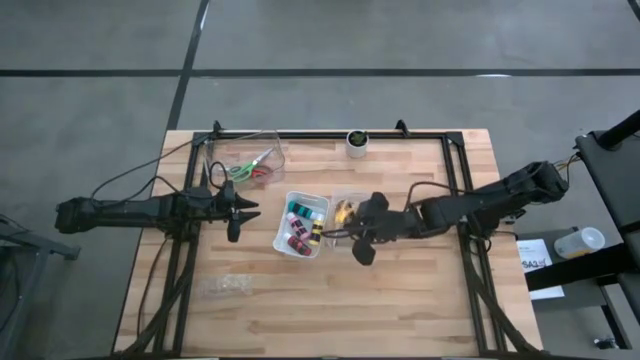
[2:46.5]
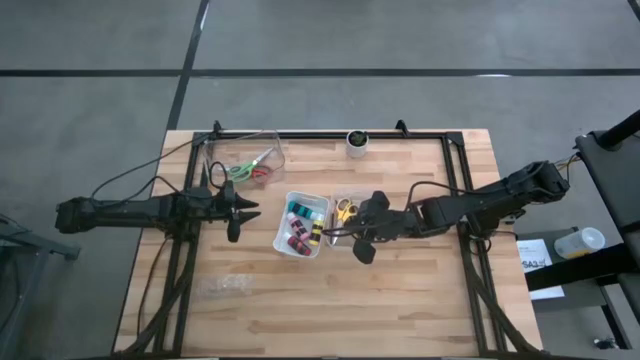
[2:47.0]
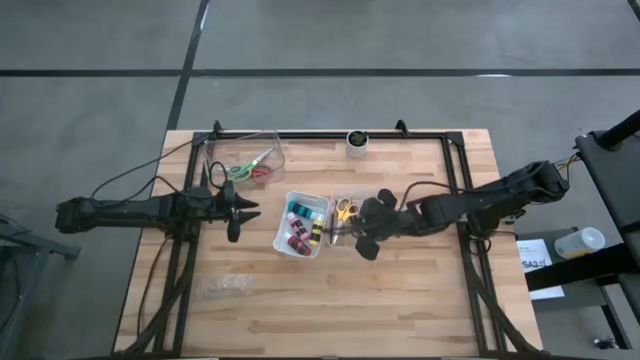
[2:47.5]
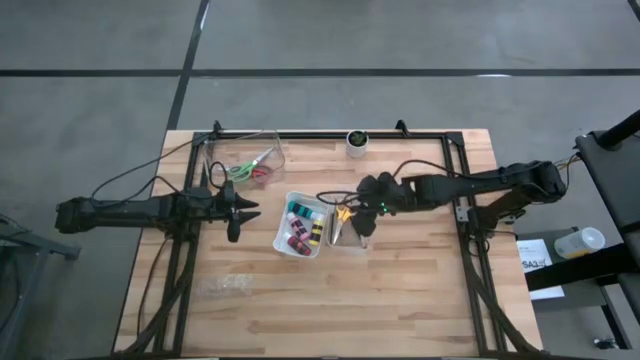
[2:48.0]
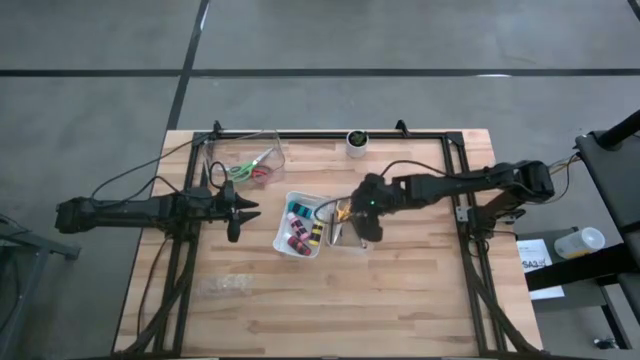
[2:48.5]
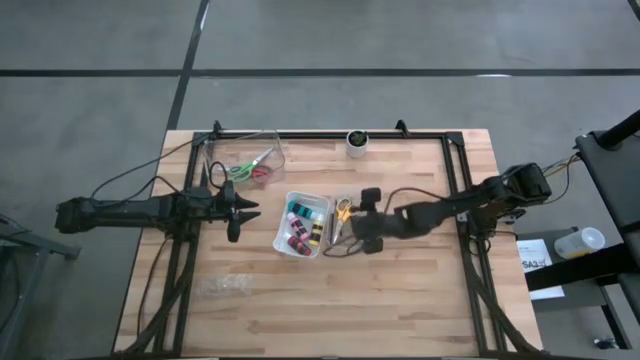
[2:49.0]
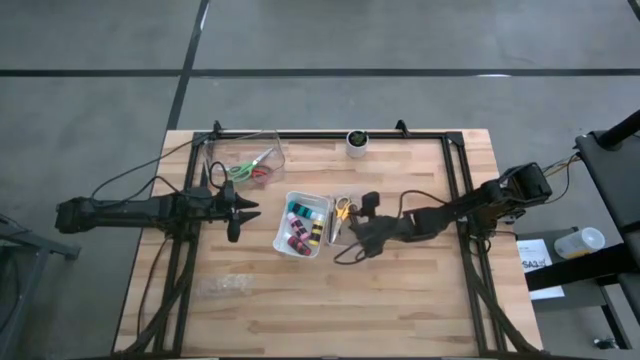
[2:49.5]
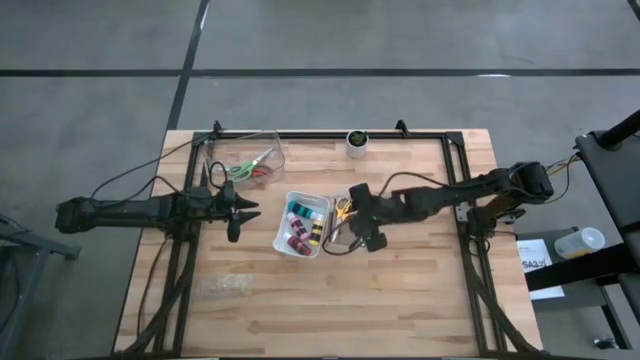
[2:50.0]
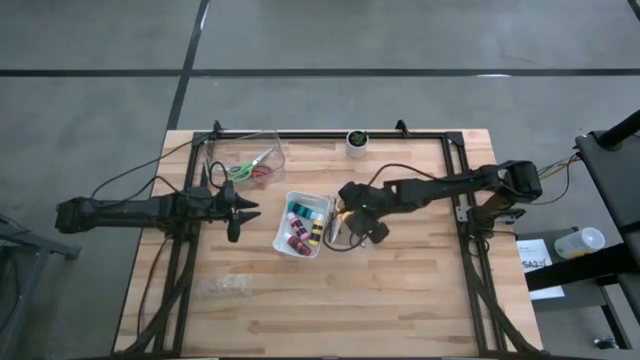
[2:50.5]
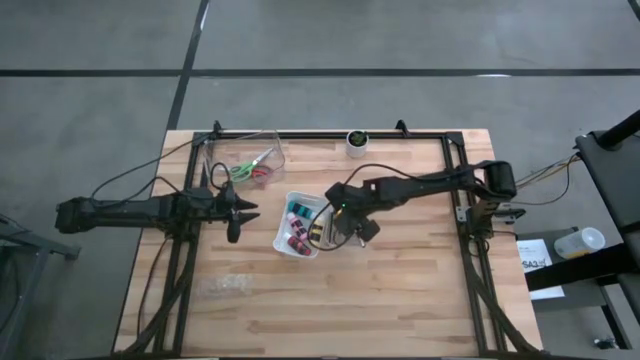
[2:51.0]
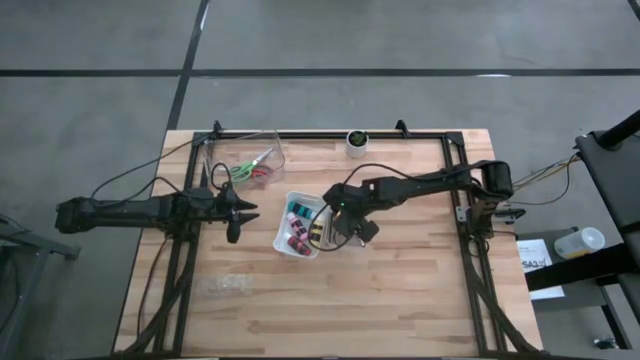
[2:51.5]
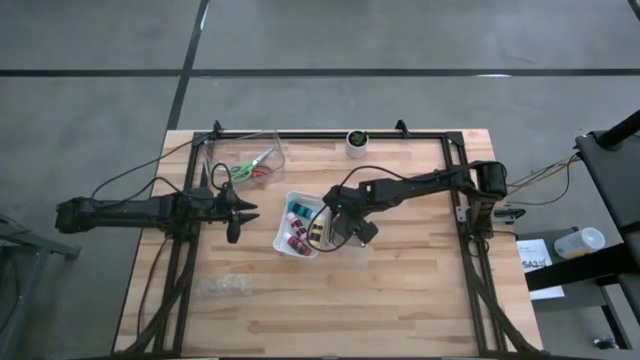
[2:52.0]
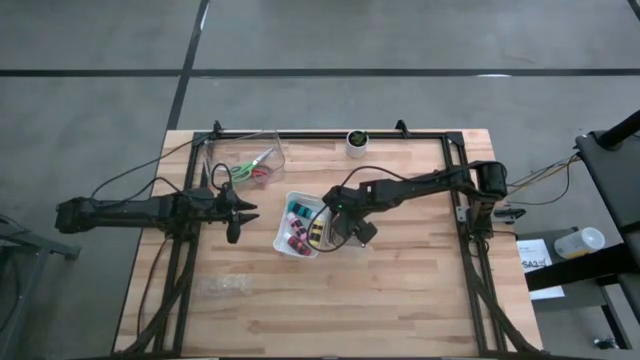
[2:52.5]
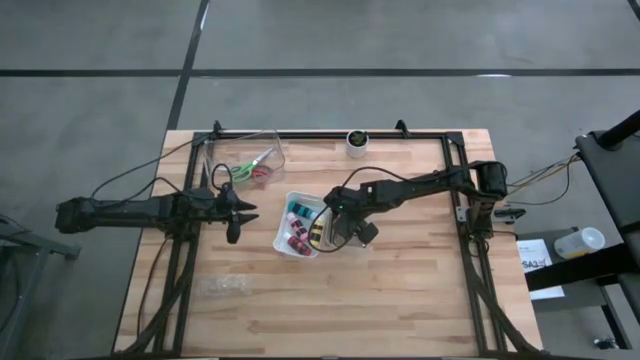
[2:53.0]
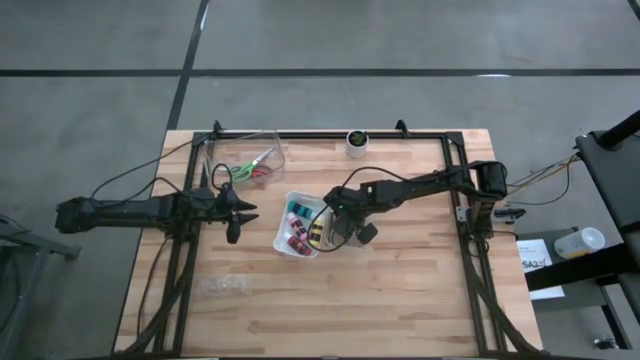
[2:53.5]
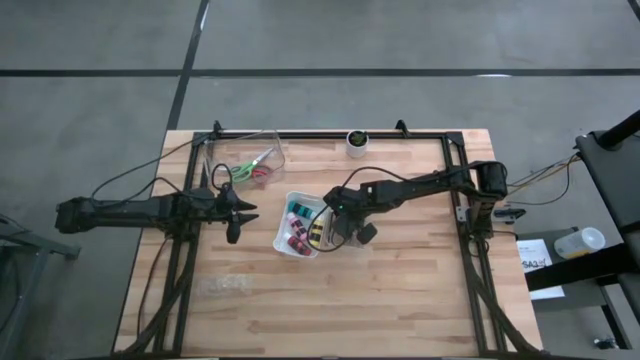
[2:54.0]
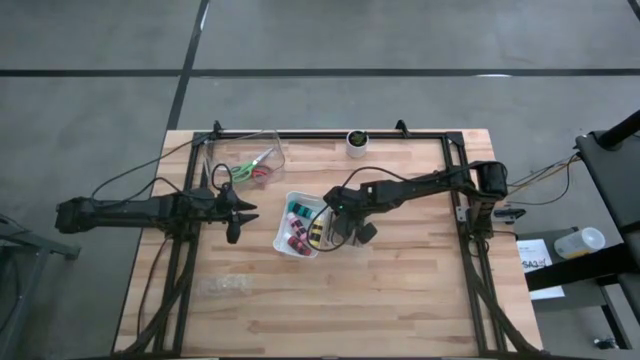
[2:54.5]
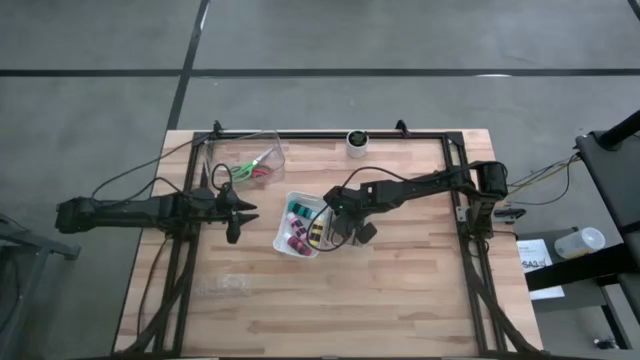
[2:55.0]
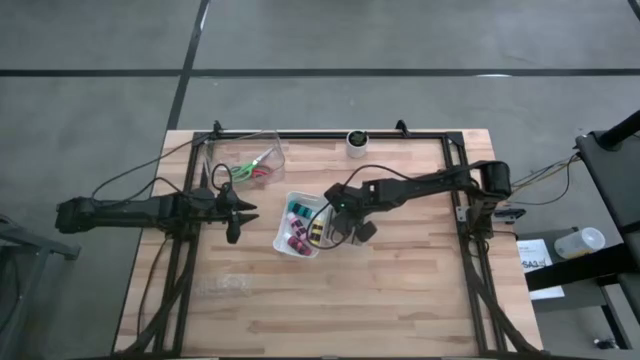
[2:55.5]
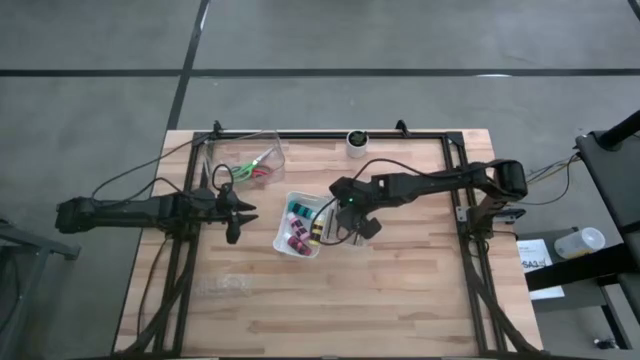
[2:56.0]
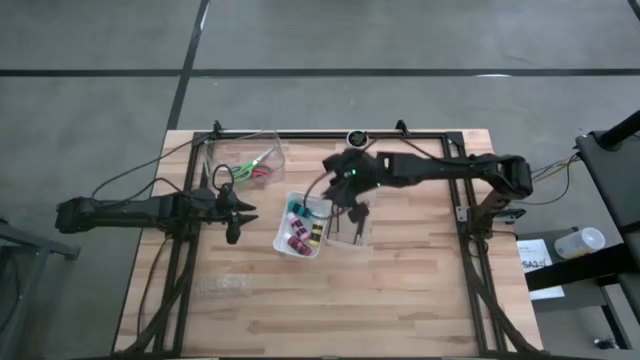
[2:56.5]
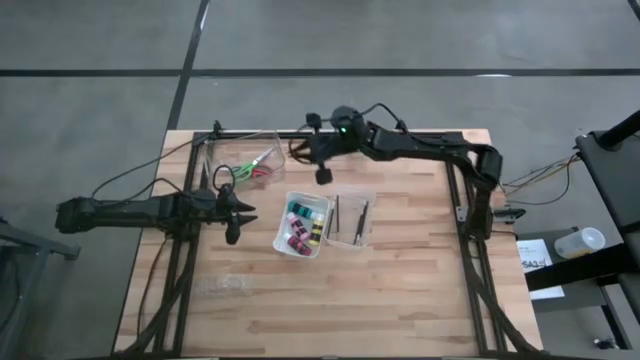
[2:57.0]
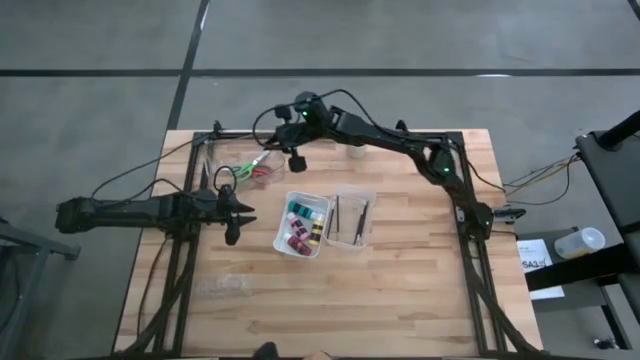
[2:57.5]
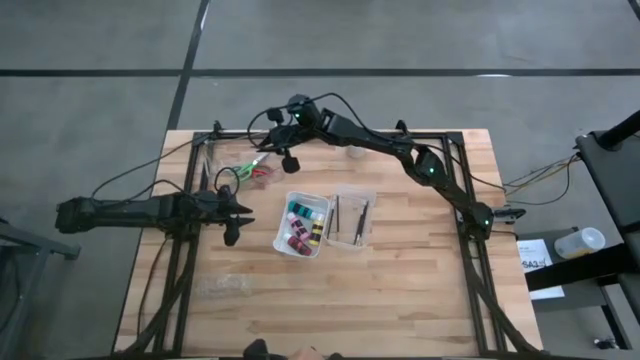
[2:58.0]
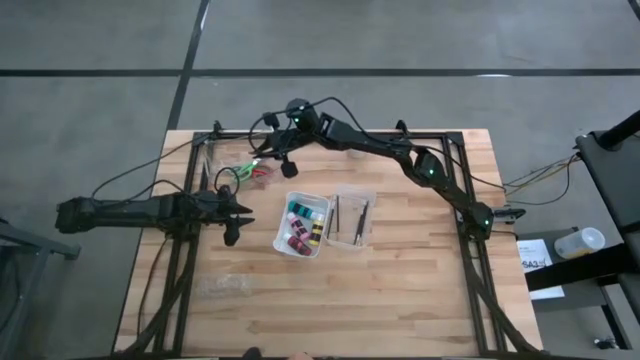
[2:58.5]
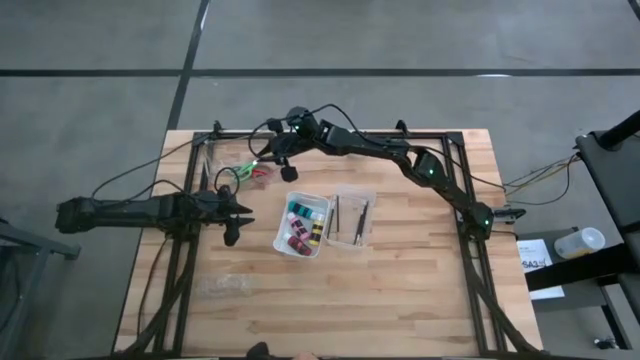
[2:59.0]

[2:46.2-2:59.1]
Task: Pick & Place Paint Supplies
Put the yellow scissors into the top transparent bin

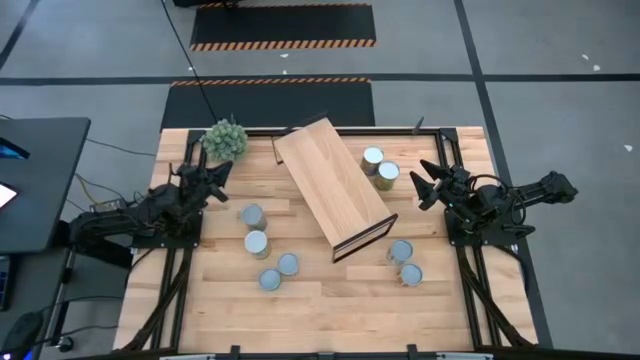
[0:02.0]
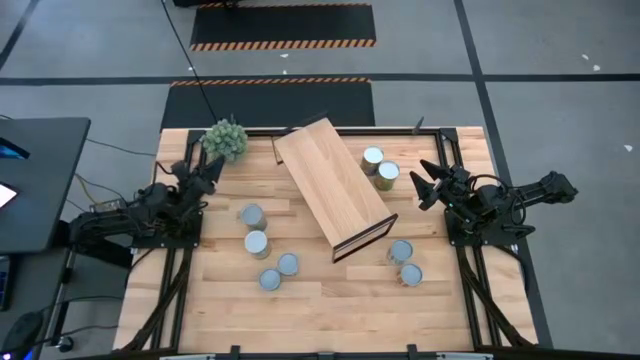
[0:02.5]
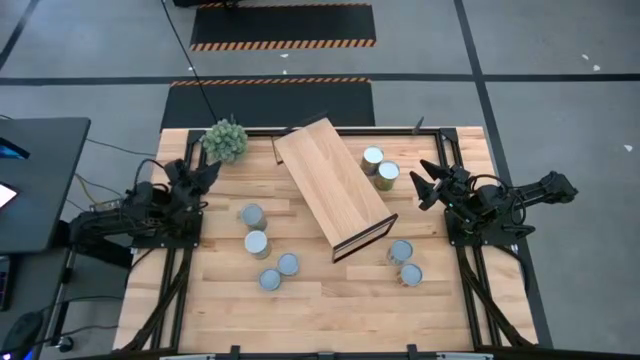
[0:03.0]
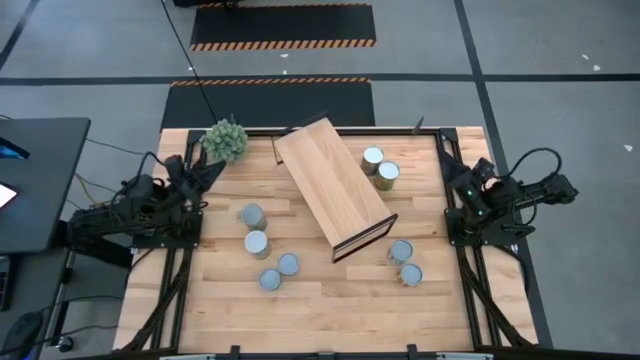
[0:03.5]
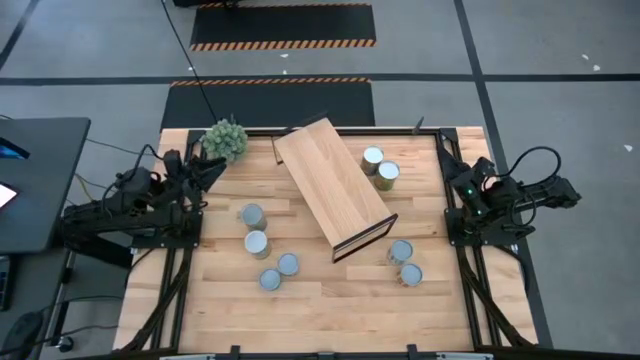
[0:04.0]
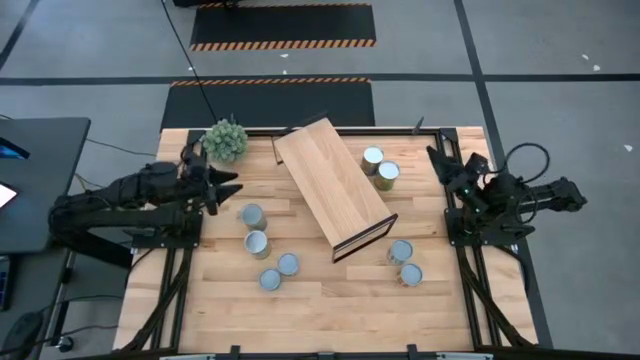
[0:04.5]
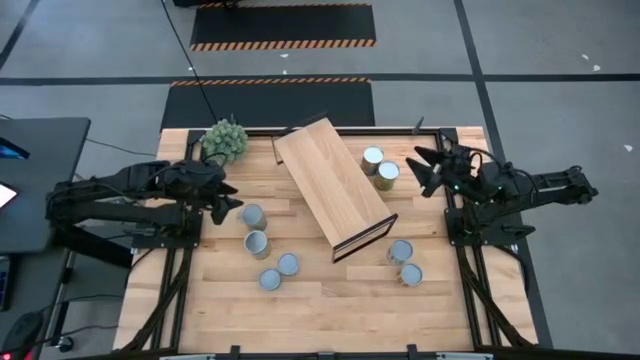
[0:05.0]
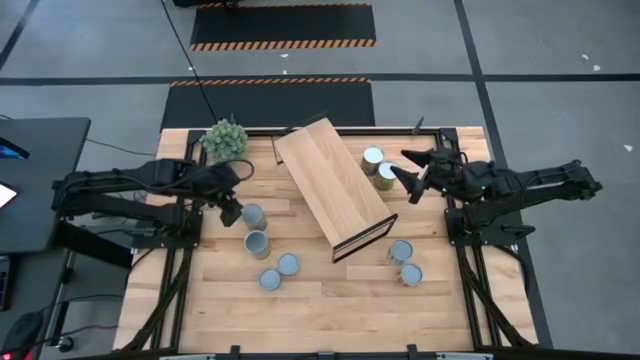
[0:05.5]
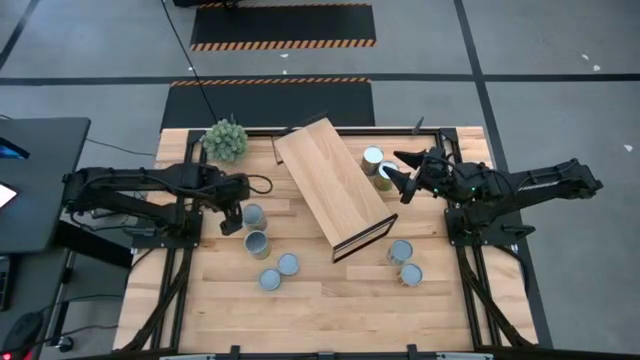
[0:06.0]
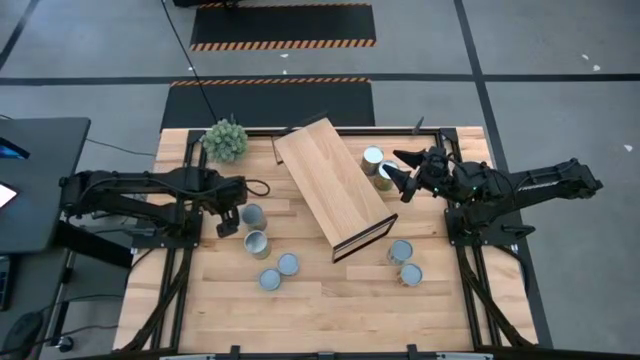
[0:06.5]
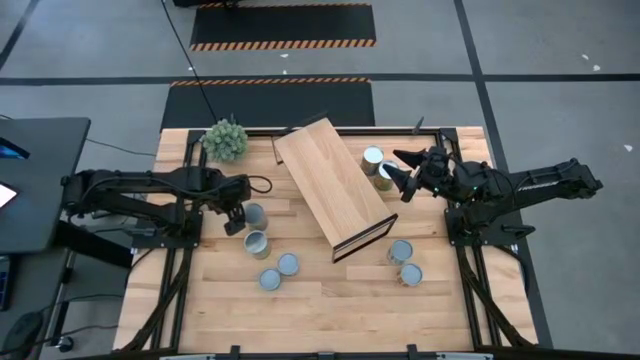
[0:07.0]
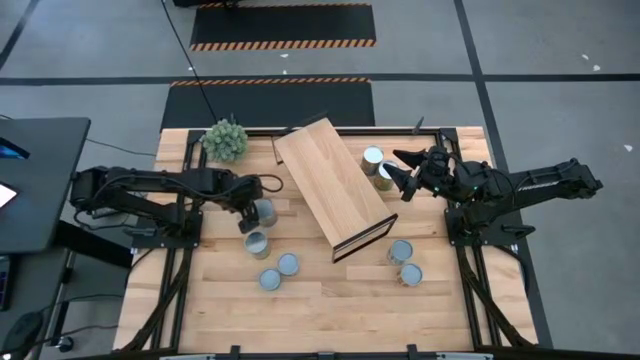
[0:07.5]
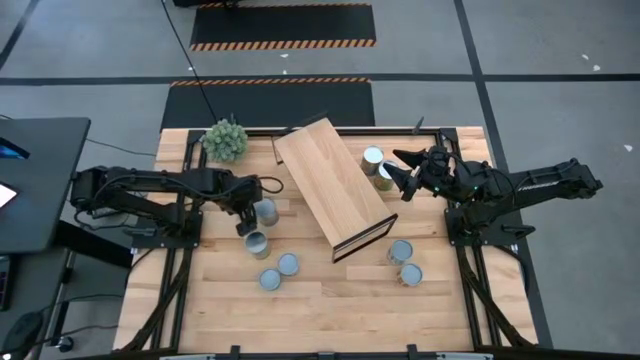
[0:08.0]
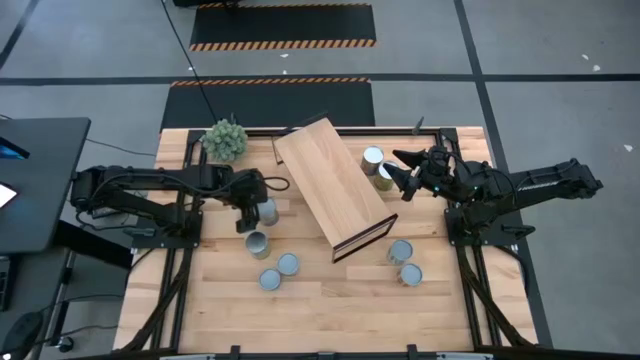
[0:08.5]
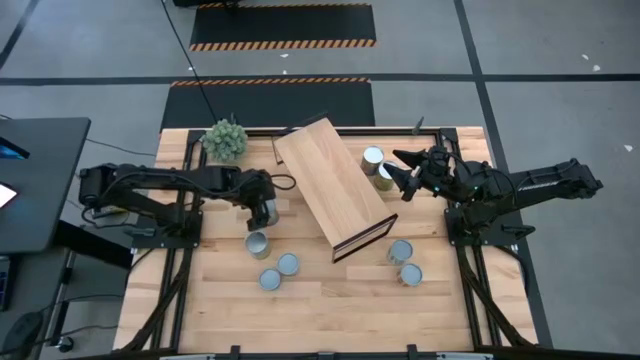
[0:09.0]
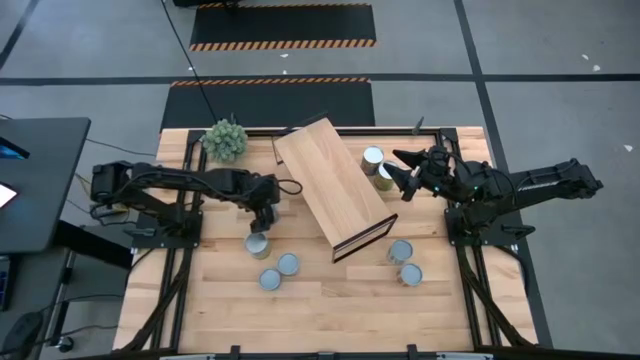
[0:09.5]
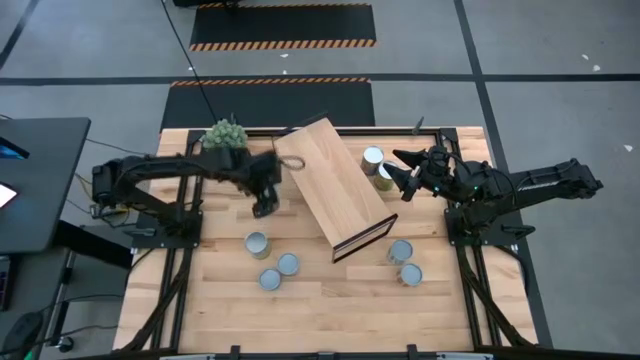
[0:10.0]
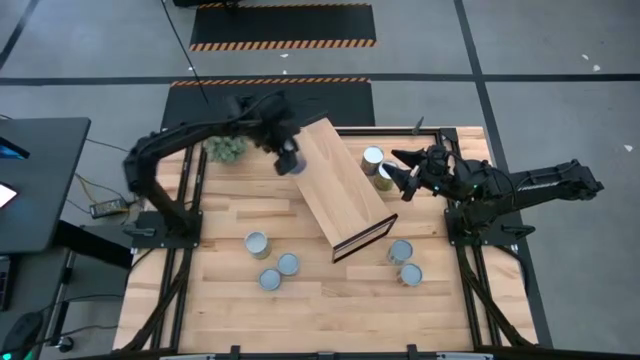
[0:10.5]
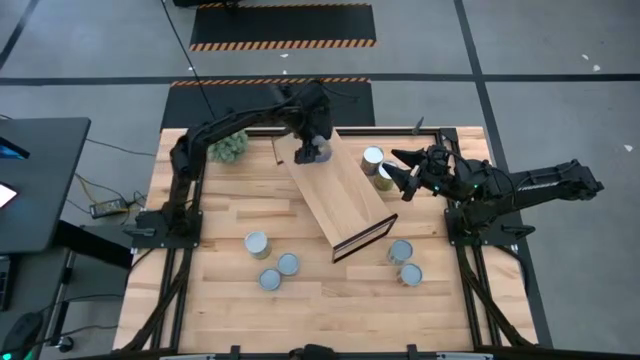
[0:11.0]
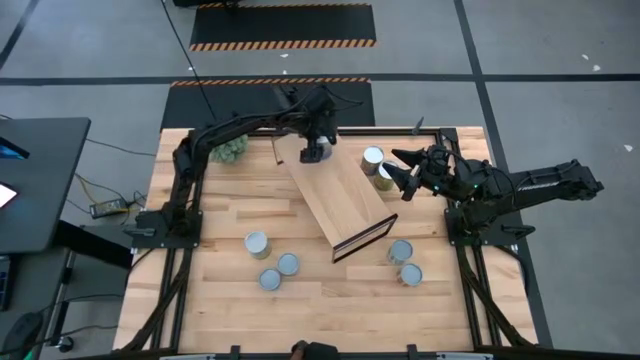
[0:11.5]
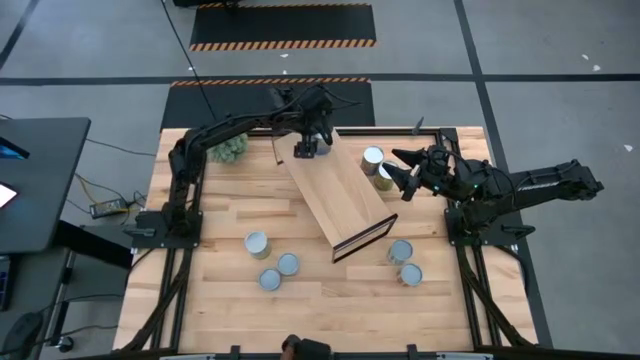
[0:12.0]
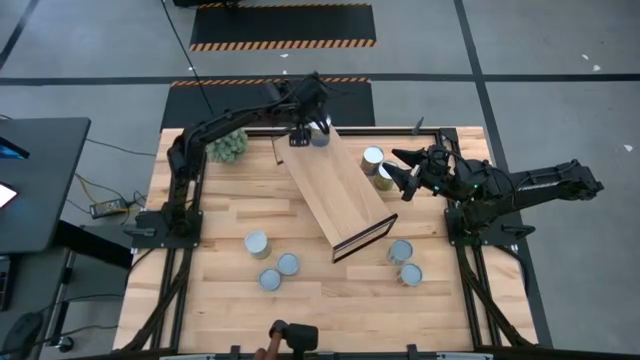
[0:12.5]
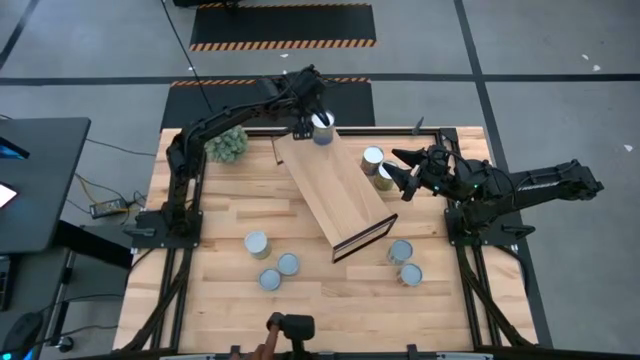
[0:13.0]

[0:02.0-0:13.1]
Task: Pick and place cans onto a shelf
Put the large canned peas on the shelf
